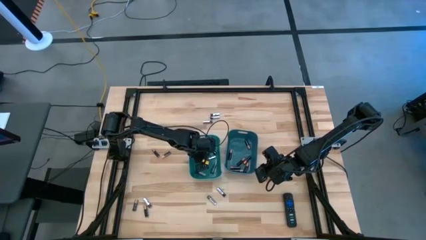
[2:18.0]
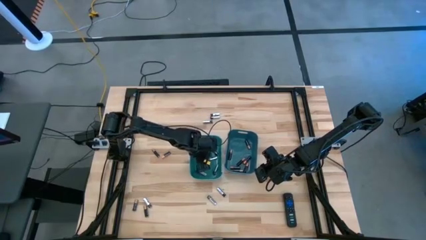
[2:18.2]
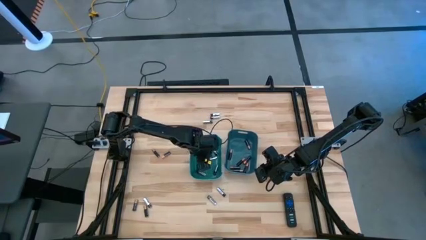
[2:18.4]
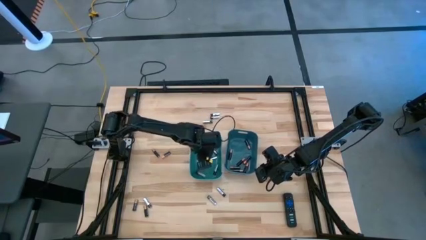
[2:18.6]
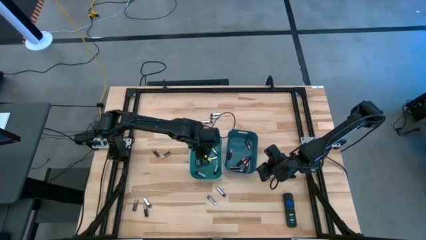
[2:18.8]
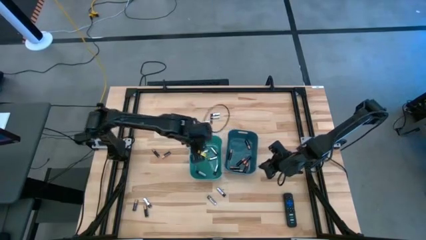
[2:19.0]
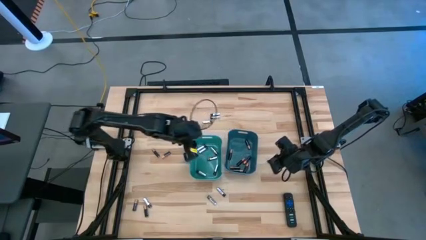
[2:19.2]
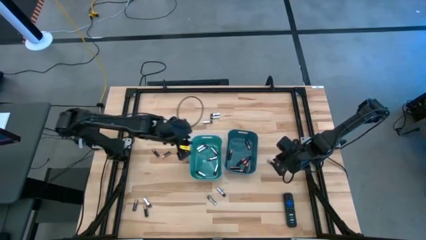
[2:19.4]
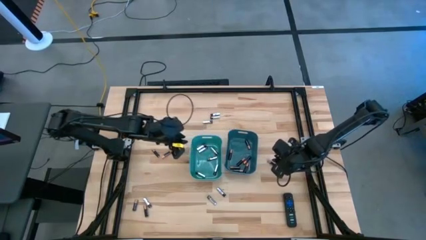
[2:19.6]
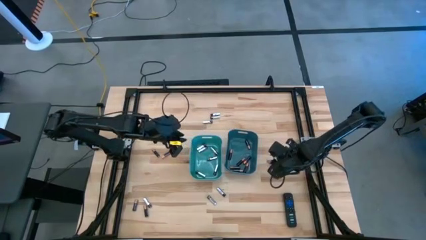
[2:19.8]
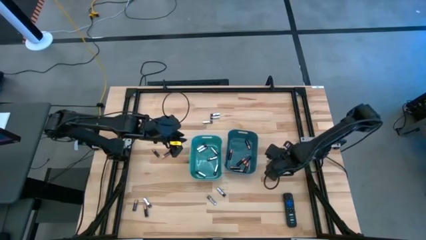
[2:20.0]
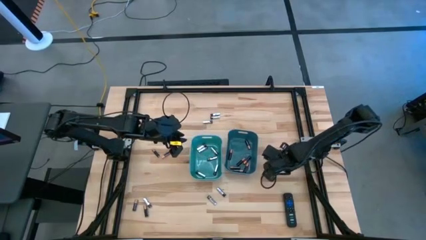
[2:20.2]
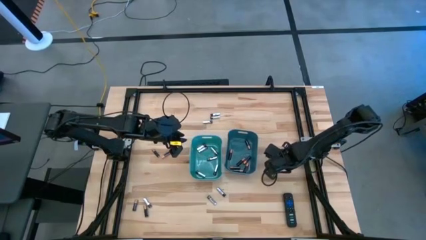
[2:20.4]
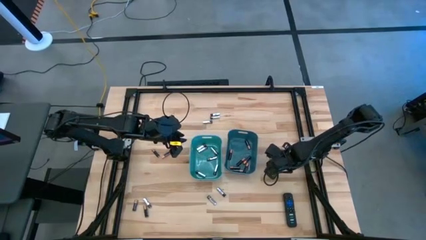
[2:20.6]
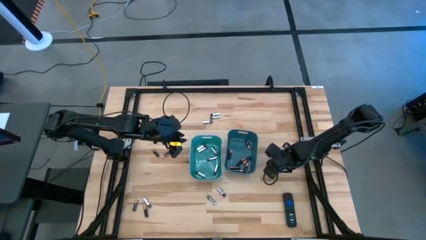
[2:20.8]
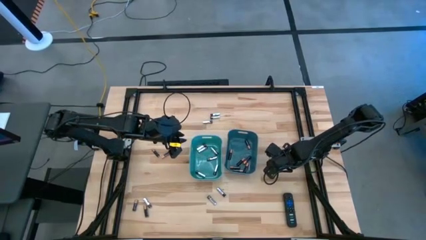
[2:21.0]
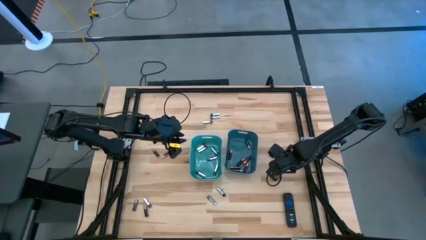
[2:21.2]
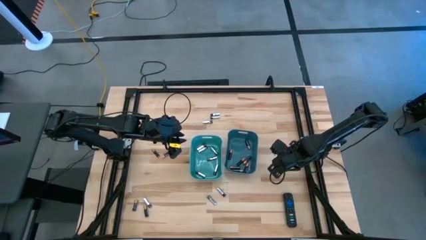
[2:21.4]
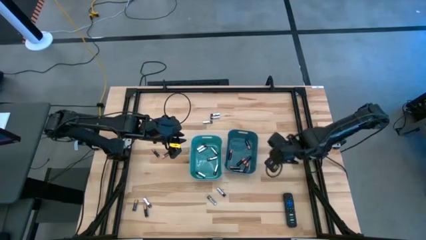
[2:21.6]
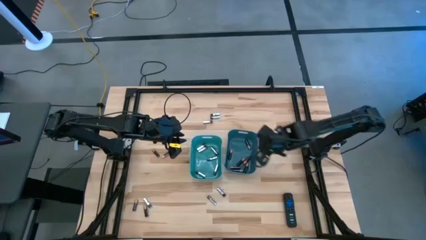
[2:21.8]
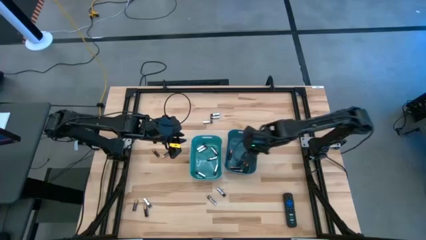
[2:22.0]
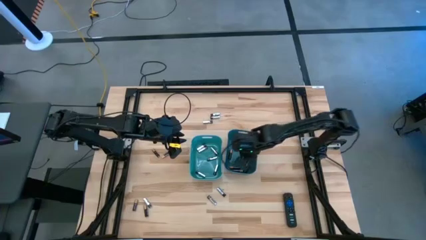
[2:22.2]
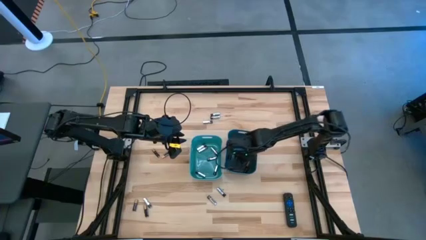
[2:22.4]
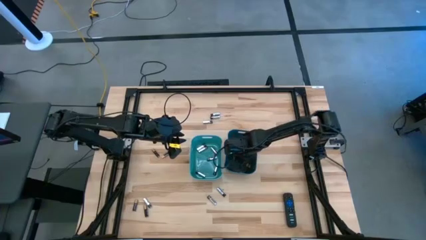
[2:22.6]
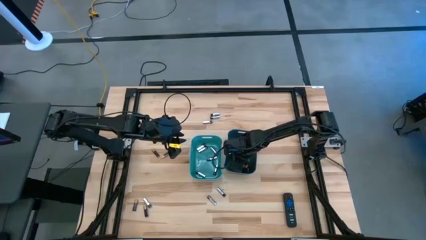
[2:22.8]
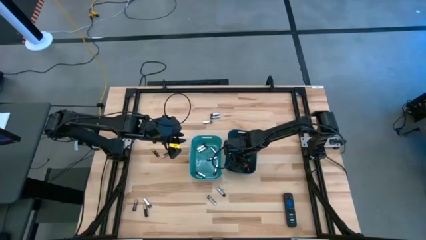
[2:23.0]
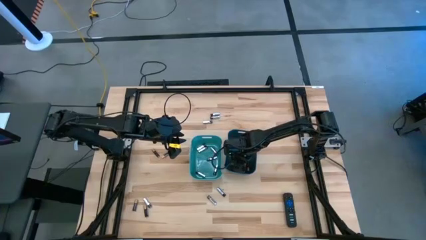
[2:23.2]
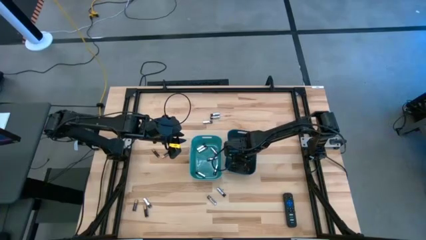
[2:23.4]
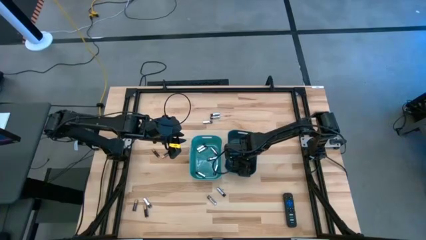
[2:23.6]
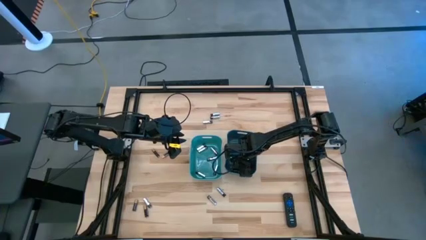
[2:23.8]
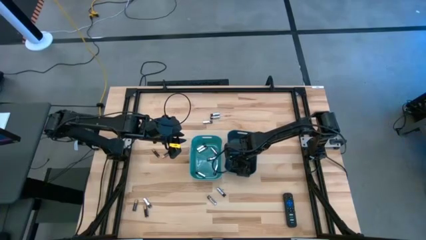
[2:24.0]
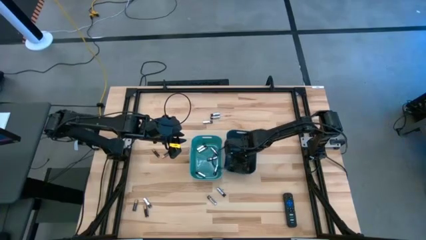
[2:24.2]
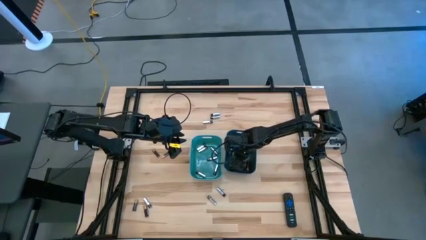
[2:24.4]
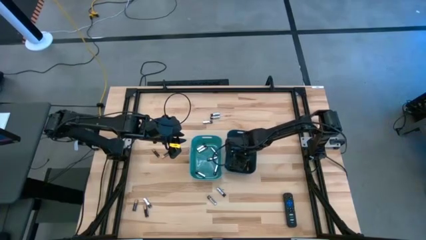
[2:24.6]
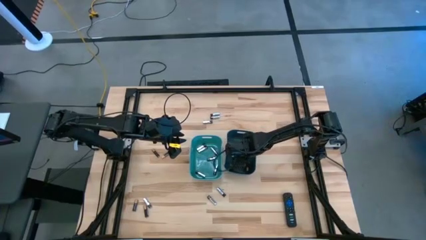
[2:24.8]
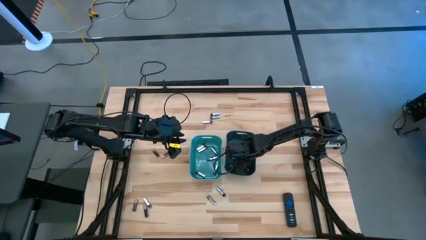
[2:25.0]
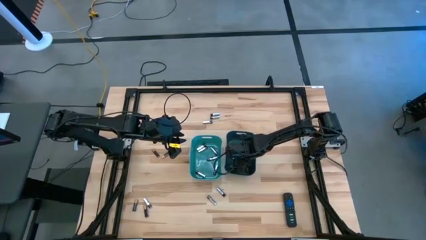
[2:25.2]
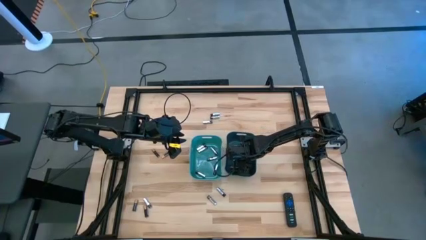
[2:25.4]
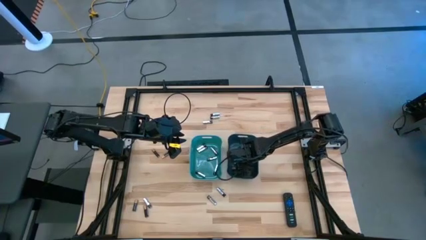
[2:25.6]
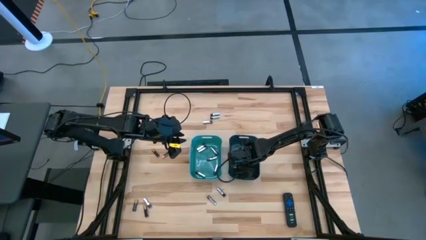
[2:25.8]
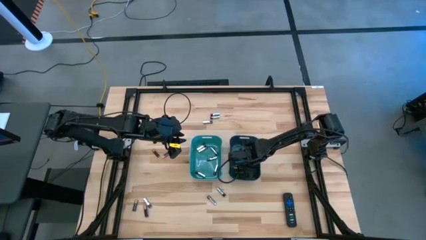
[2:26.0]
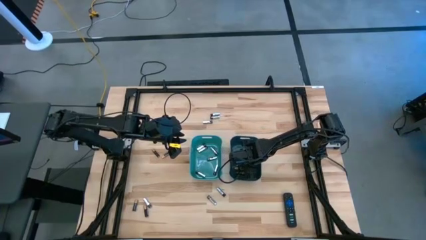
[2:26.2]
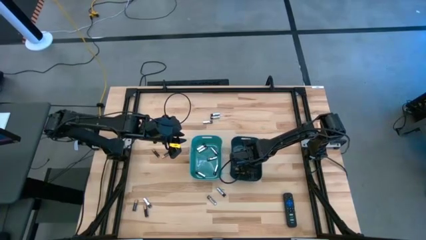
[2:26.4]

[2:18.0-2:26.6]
Task: Sort batteries
Put the black battery into the blue bin

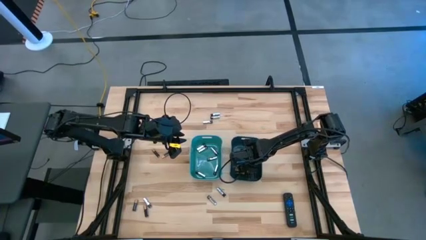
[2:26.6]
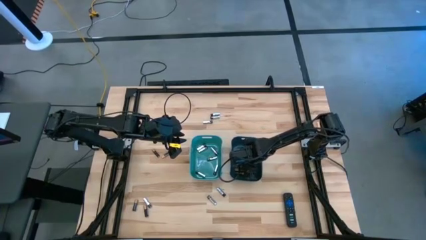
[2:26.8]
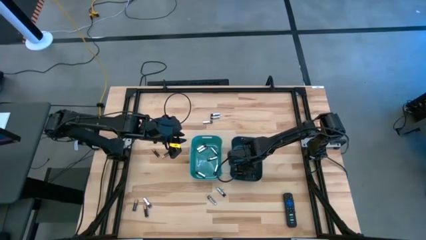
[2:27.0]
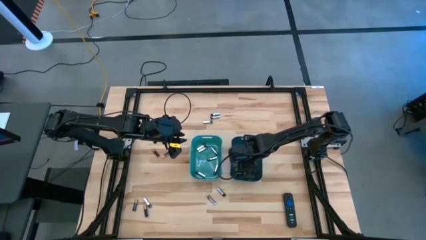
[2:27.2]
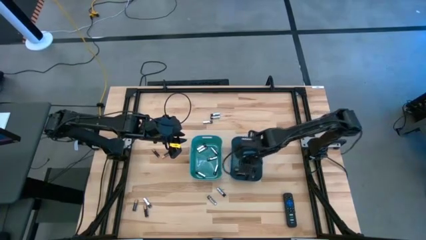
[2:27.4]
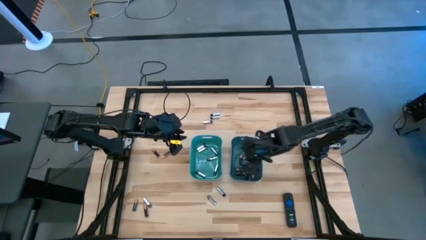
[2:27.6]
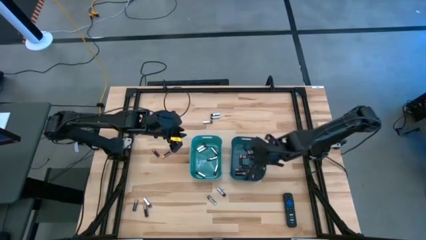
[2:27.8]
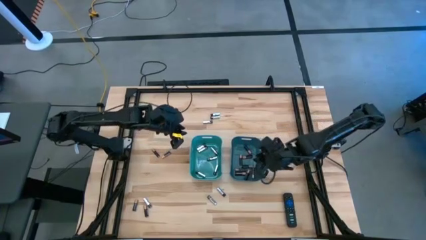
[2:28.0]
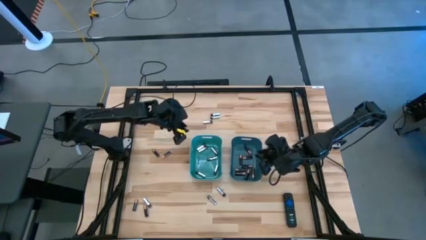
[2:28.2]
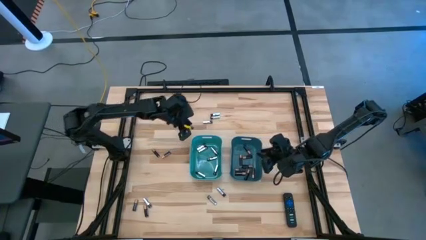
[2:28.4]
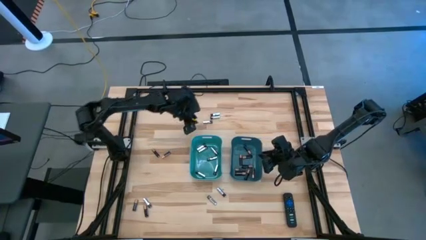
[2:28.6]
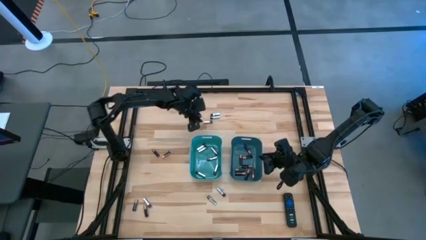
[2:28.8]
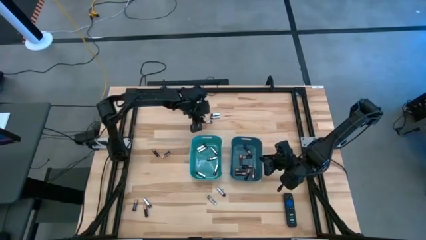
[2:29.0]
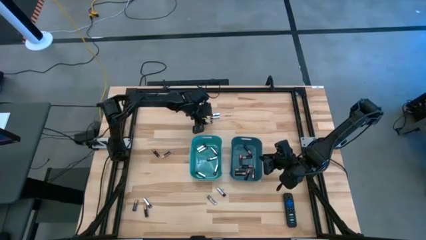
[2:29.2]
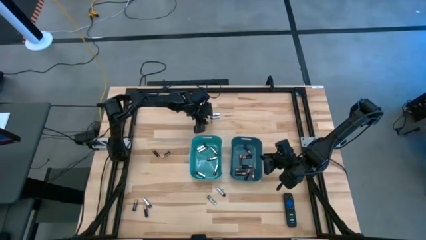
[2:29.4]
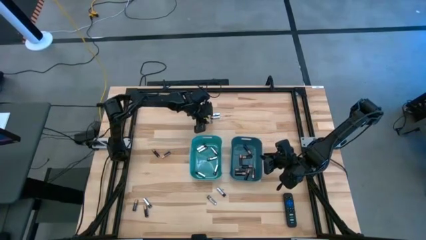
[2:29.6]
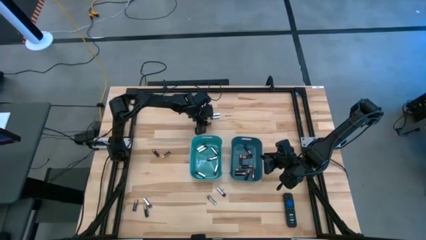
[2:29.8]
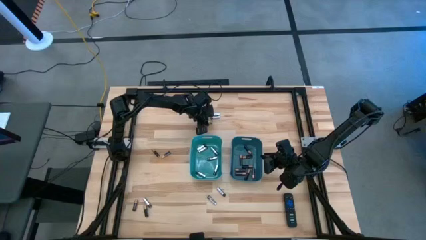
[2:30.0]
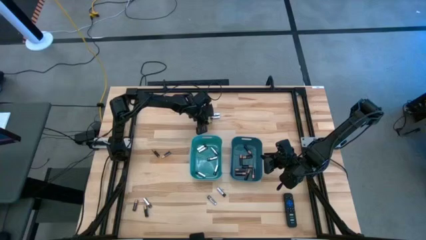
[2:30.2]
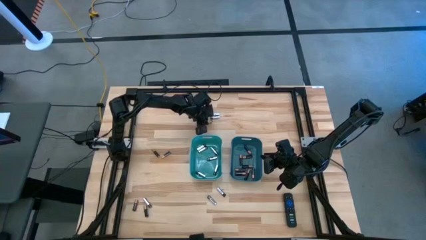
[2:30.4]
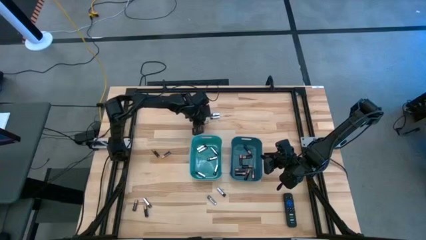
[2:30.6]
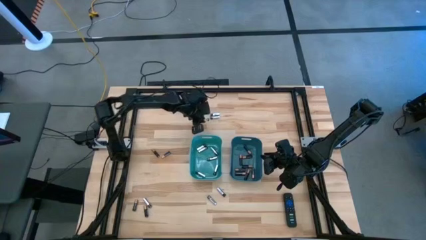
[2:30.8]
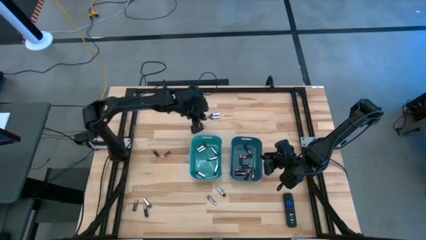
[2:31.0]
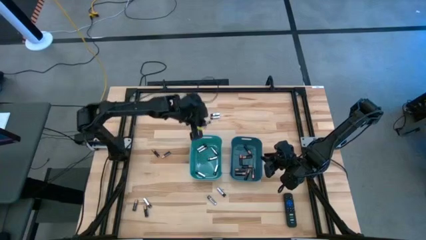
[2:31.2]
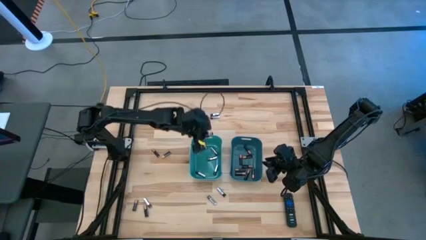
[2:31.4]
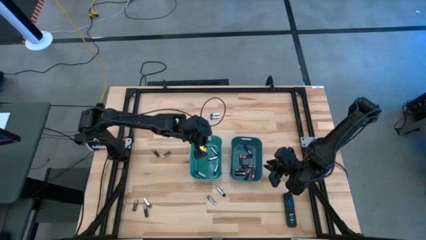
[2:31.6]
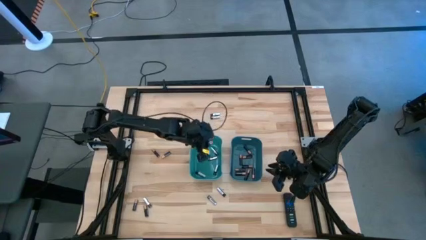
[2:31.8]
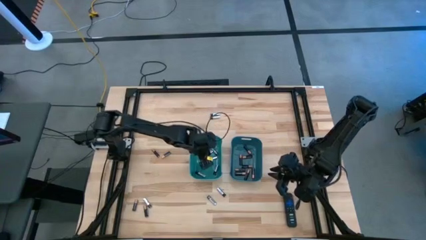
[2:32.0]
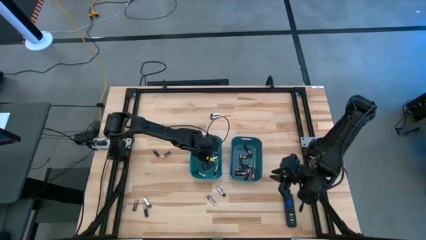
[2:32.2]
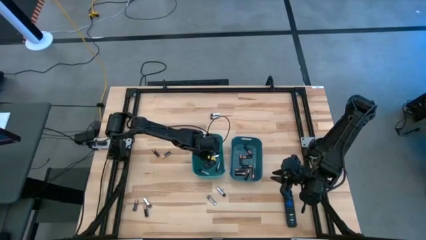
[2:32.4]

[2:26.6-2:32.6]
Put the silver battery into the green bin
